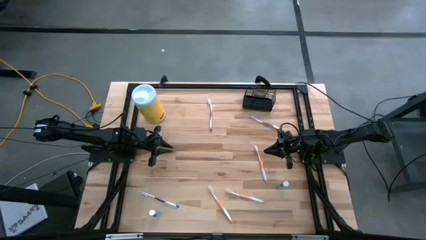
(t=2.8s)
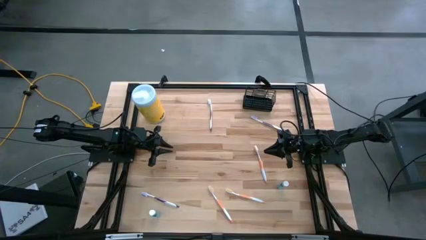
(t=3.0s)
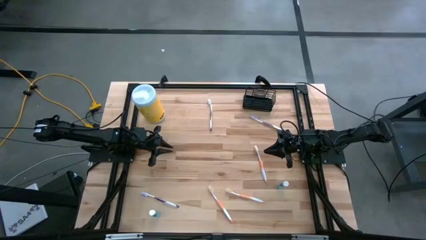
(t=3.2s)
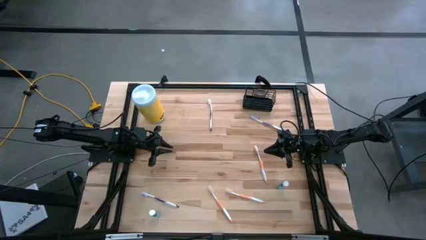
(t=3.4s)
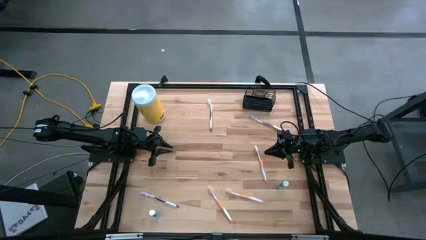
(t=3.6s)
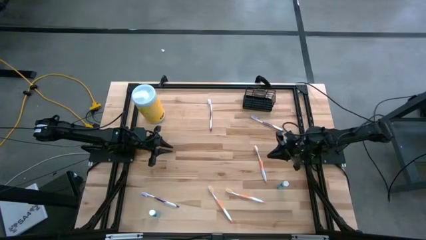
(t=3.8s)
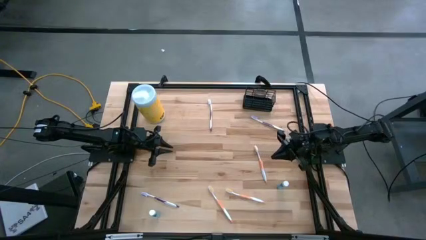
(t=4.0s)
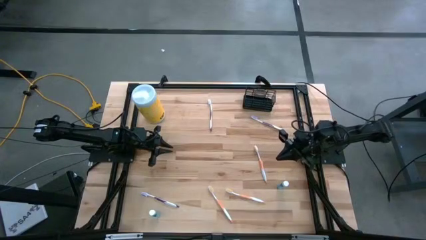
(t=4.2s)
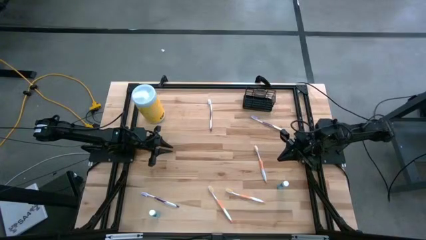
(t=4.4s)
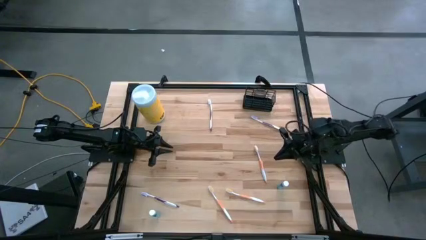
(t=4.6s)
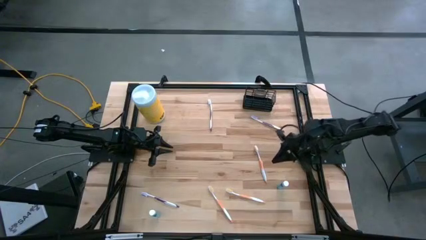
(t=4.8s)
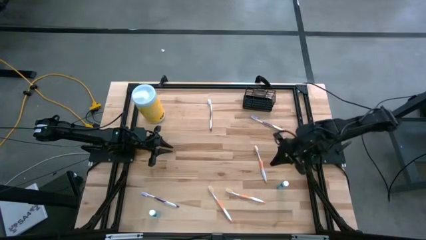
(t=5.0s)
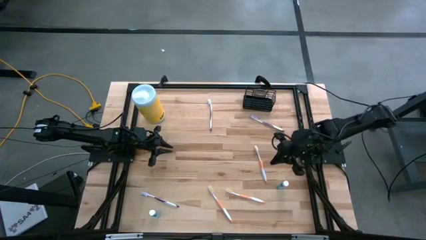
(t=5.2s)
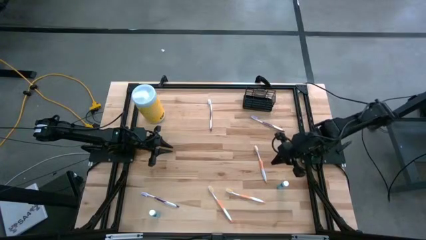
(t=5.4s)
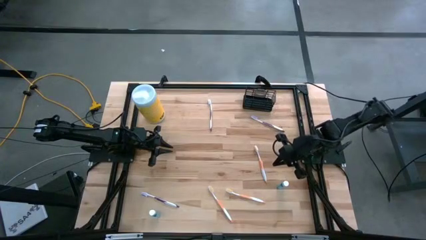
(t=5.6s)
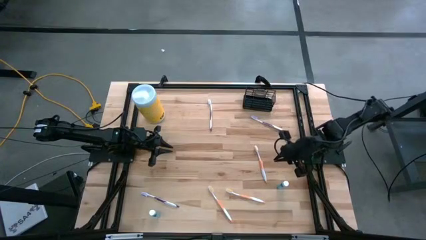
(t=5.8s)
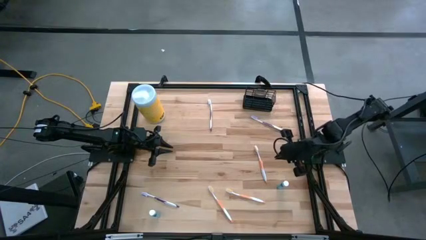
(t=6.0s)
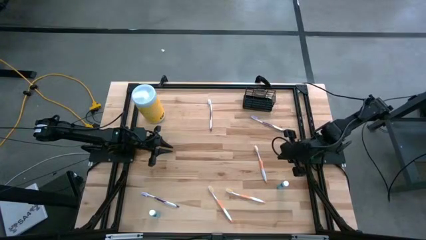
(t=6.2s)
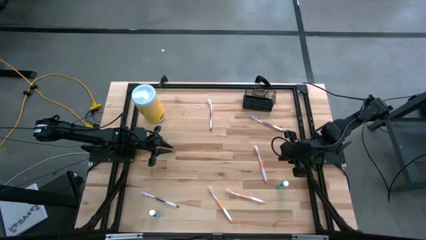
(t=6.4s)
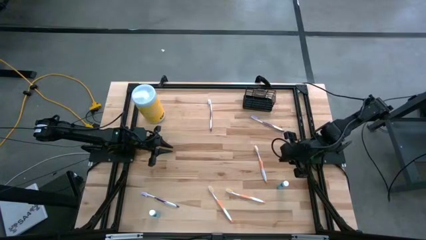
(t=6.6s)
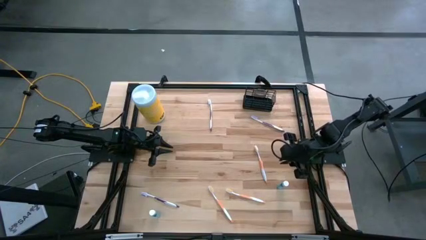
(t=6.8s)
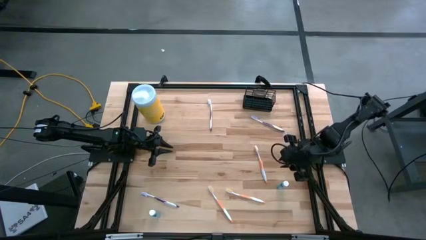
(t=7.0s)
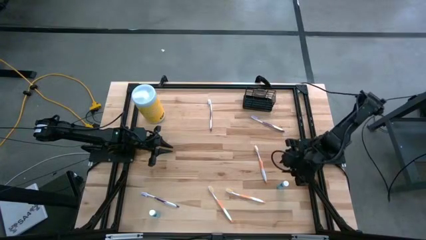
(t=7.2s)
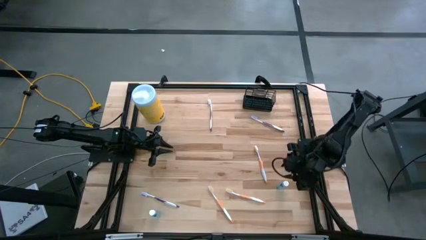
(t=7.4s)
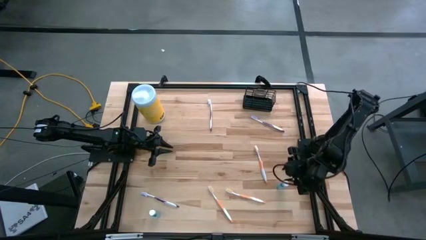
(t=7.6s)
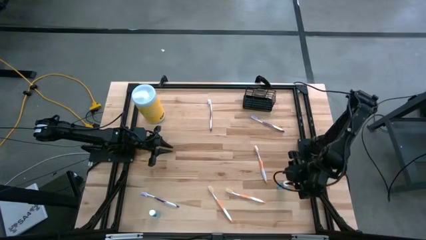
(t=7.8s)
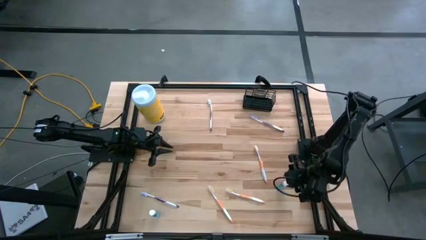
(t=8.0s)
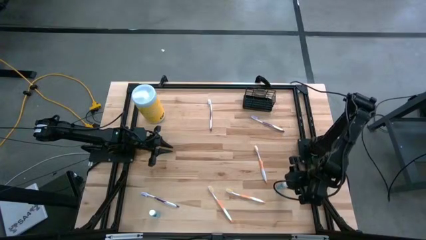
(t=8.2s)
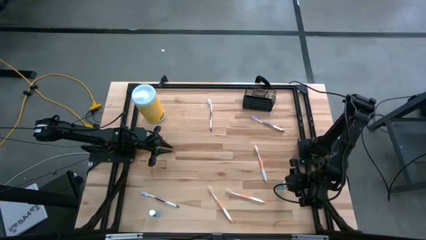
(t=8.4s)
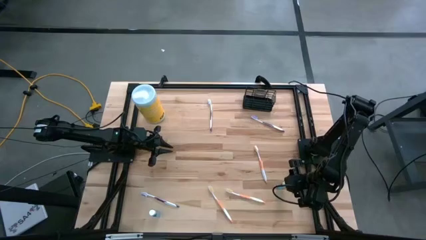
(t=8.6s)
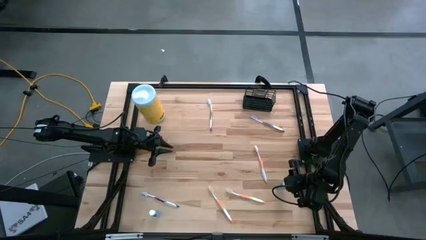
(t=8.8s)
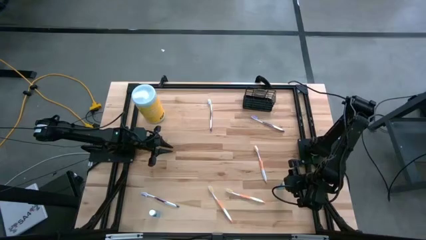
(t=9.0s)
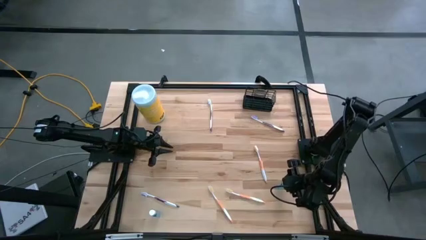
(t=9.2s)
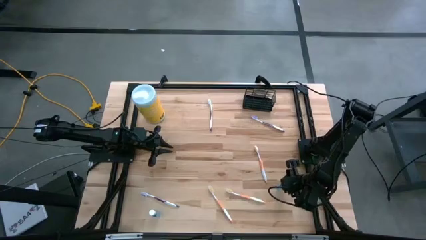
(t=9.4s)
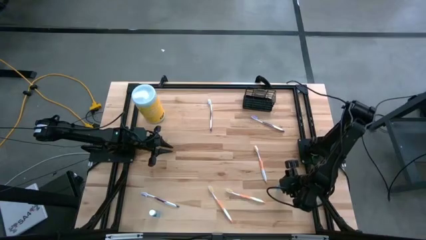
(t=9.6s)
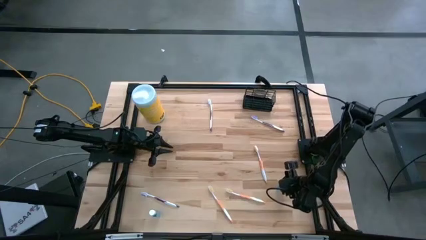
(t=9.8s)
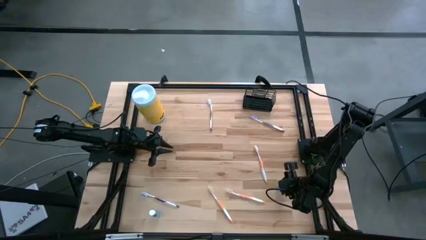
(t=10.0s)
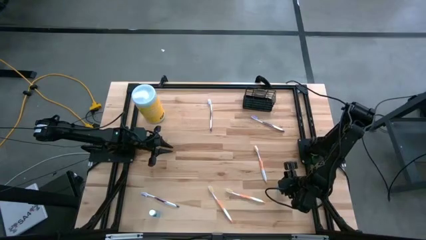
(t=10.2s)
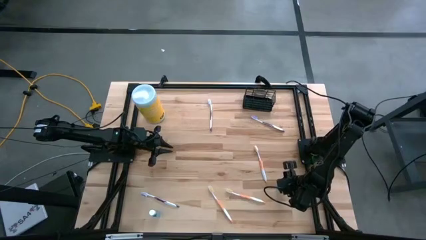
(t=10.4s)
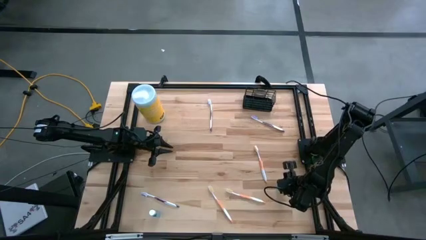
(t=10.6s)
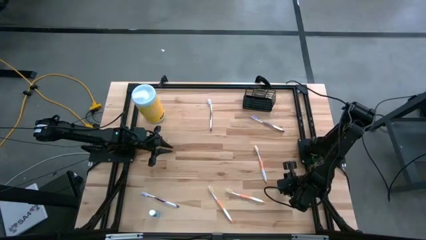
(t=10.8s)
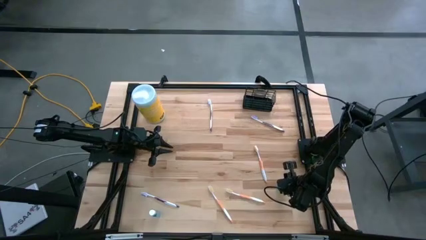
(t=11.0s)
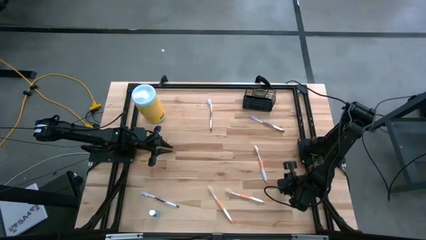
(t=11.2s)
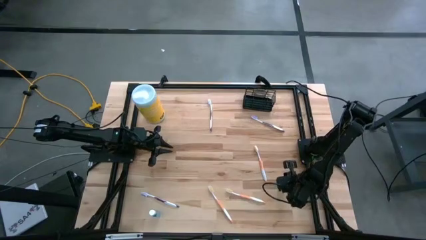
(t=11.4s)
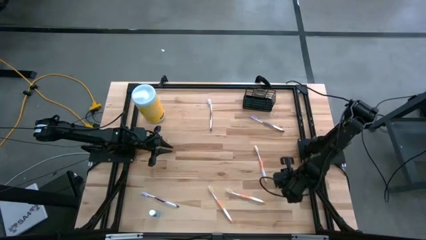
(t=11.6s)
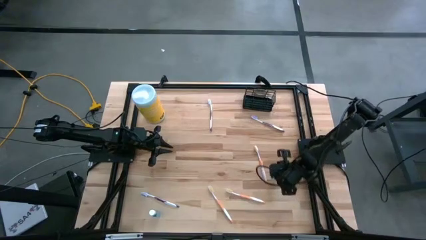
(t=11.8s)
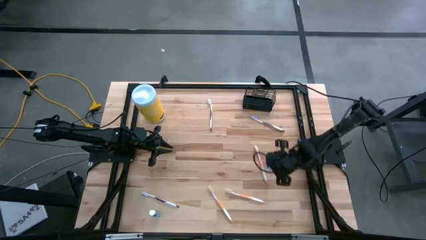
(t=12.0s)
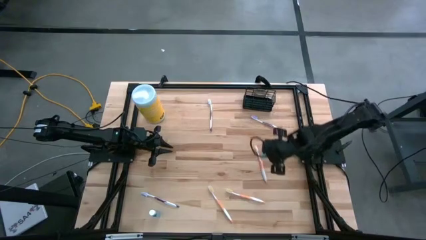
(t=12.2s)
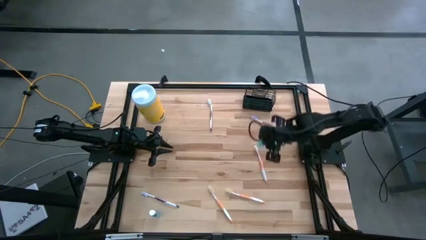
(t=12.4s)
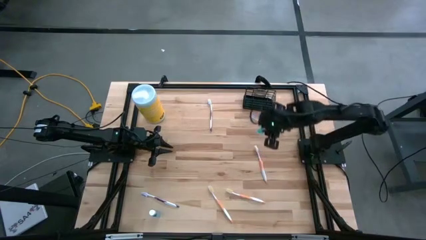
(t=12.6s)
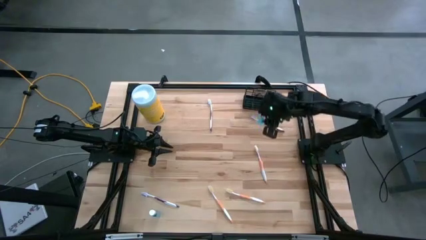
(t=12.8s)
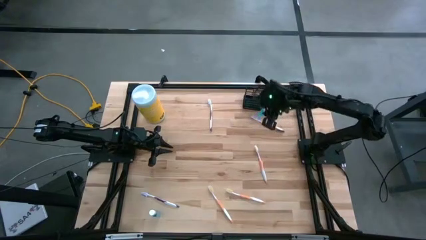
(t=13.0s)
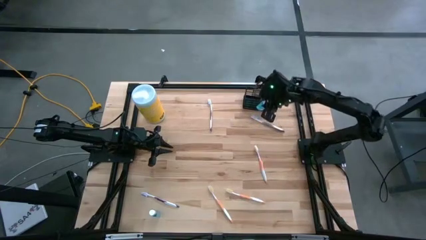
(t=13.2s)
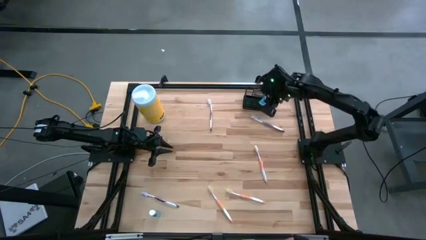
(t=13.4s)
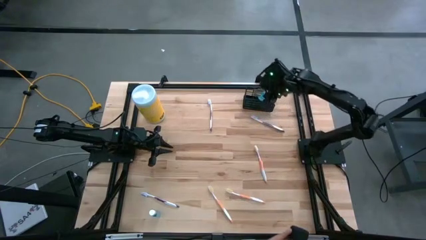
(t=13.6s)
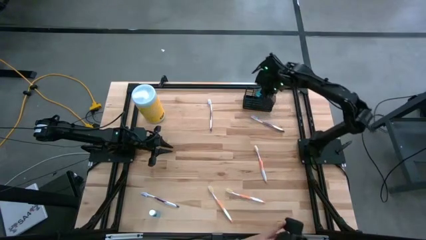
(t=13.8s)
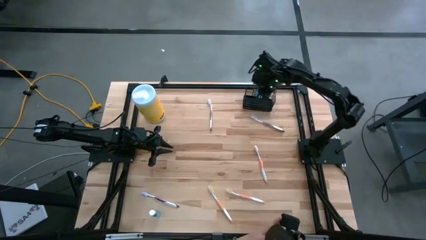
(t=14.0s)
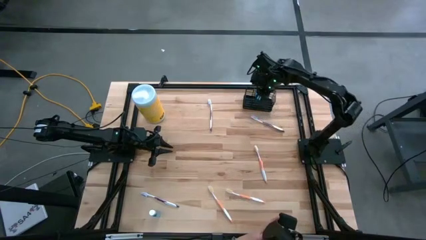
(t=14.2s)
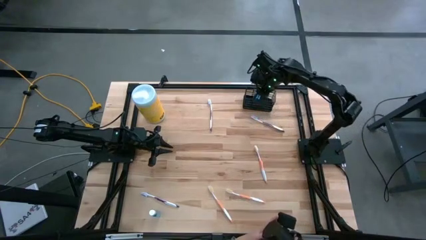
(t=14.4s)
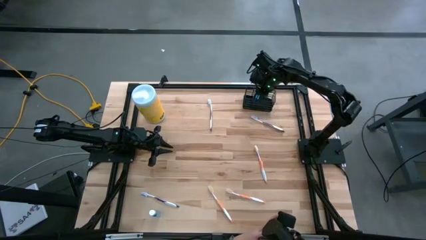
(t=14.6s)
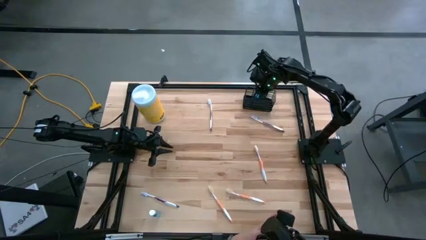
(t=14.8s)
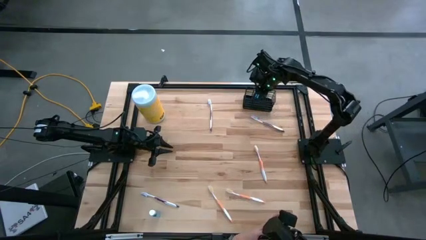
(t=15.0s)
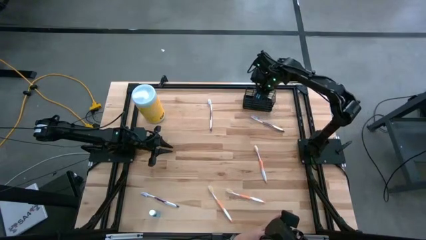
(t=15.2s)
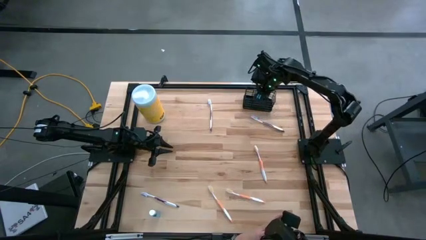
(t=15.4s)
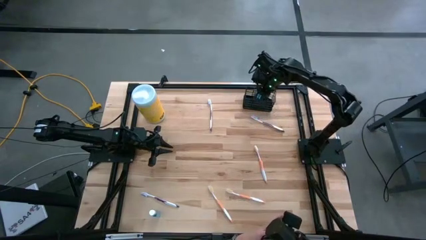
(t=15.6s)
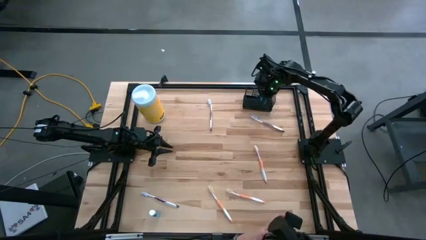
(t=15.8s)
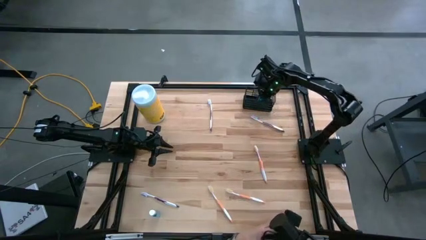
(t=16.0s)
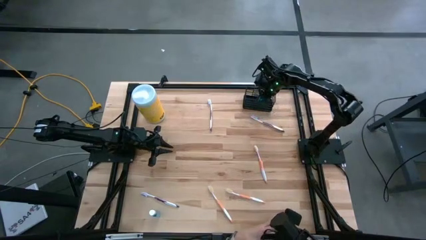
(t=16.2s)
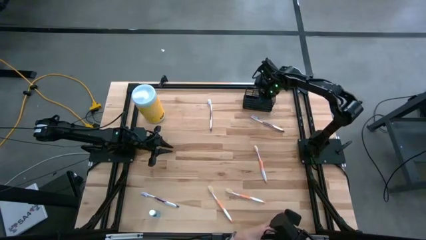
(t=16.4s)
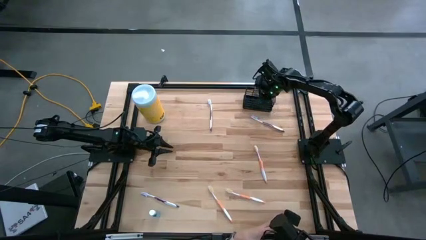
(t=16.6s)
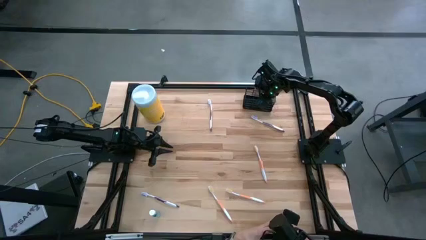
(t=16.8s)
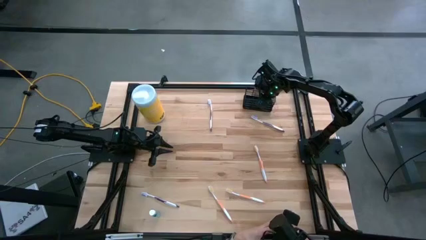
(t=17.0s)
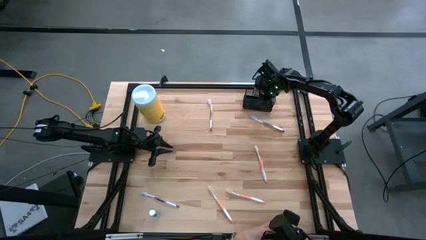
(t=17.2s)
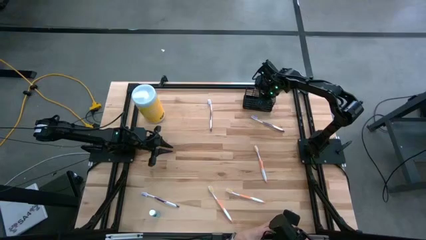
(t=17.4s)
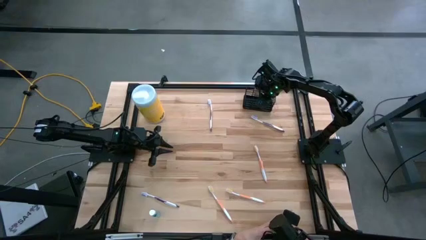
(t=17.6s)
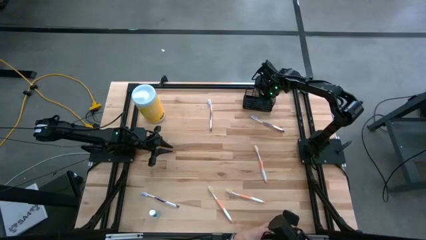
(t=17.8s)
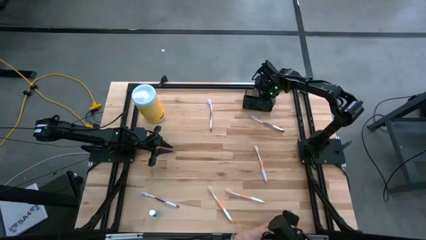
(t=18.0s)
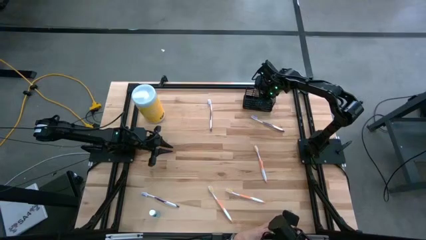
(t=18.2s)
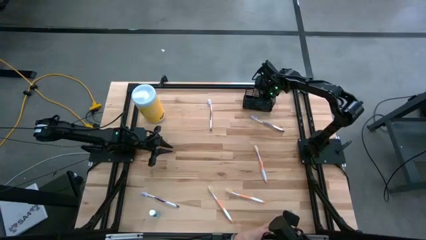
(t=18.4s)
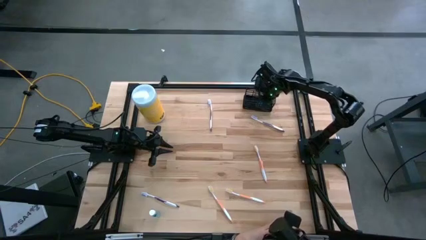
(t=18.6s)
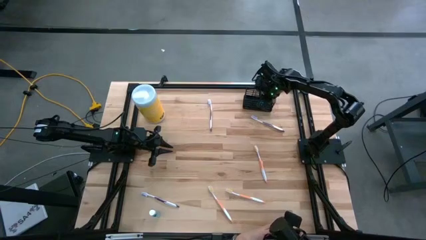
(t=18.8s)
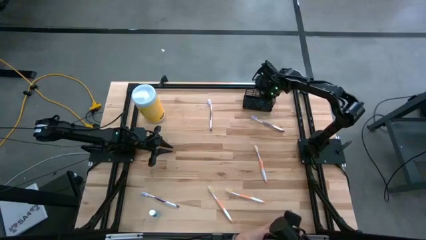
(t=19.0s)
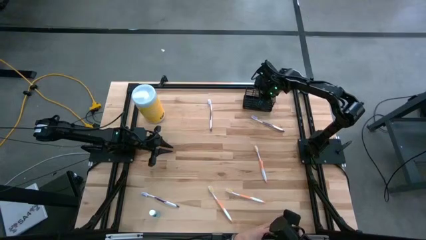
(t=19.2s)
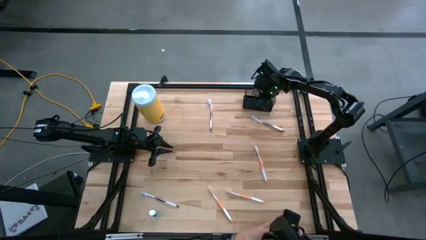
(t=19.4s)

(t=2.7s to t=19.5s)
Task: Pick & Place toothbrushing station
Put the right blue mouthwash into the black wire organizer
